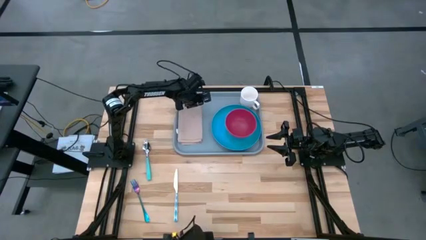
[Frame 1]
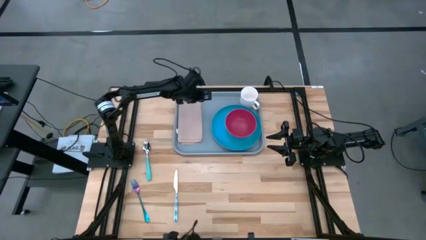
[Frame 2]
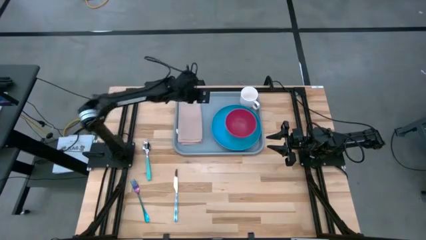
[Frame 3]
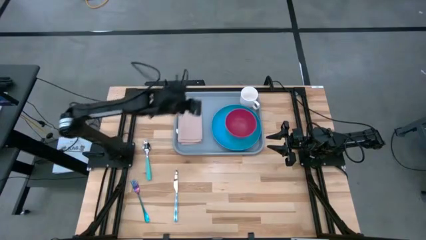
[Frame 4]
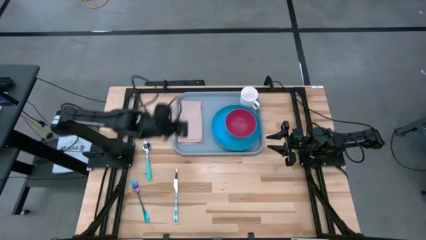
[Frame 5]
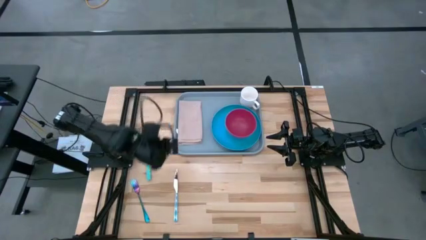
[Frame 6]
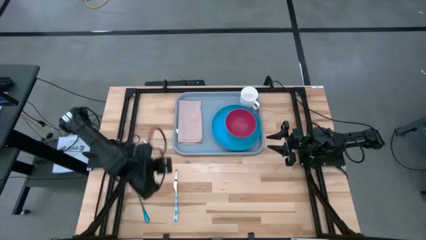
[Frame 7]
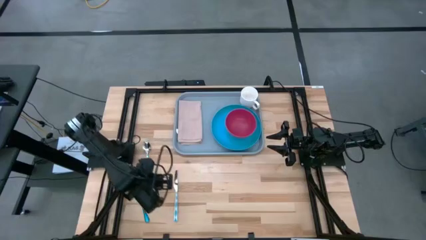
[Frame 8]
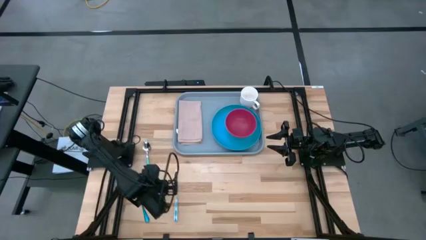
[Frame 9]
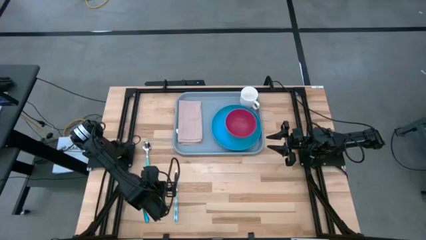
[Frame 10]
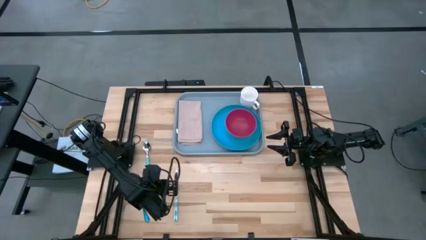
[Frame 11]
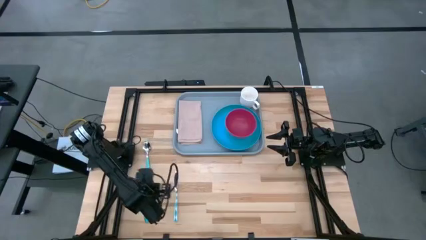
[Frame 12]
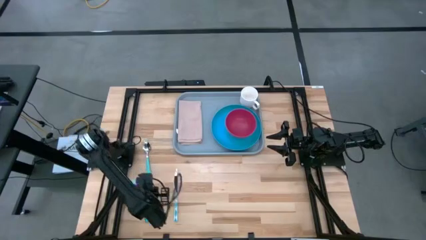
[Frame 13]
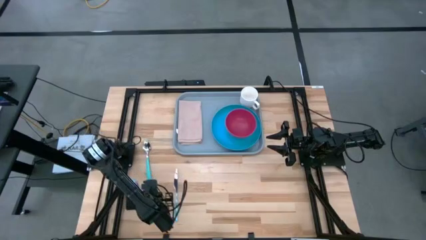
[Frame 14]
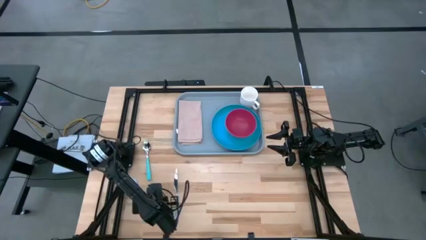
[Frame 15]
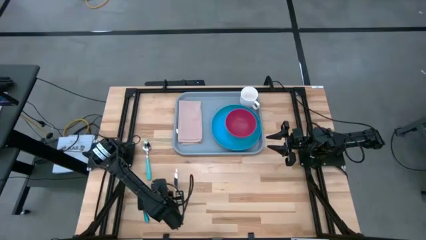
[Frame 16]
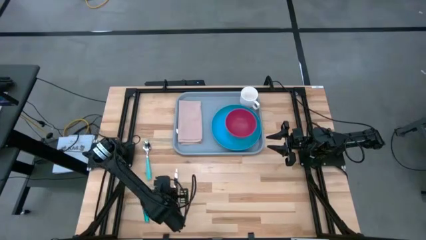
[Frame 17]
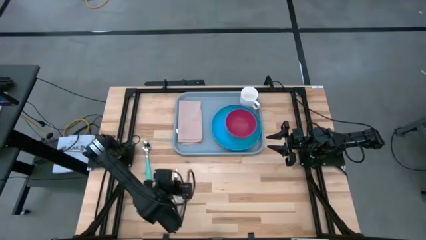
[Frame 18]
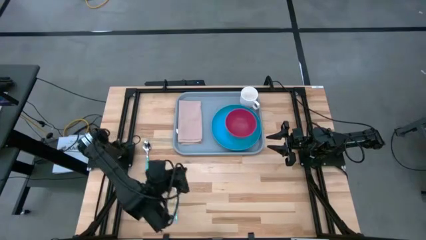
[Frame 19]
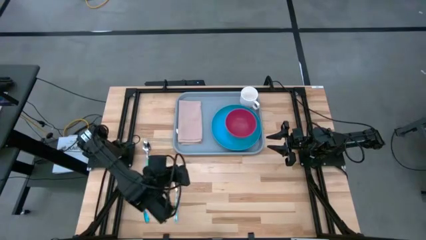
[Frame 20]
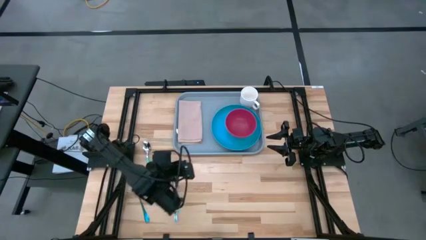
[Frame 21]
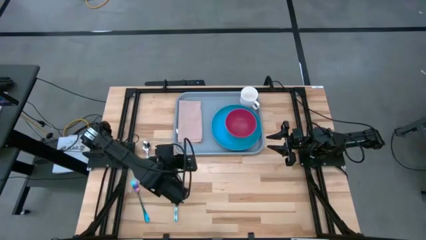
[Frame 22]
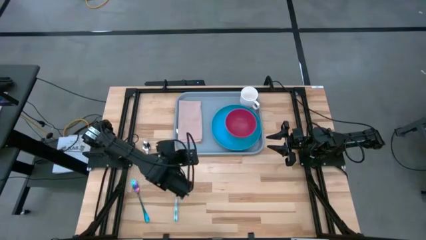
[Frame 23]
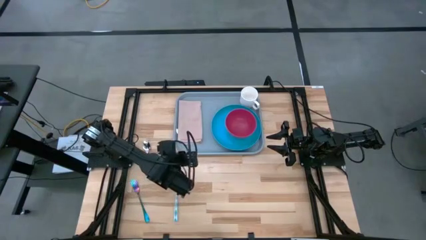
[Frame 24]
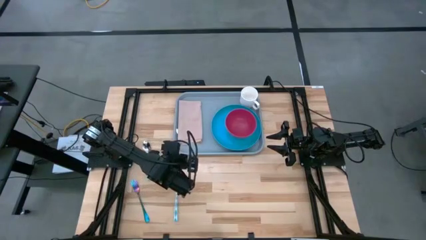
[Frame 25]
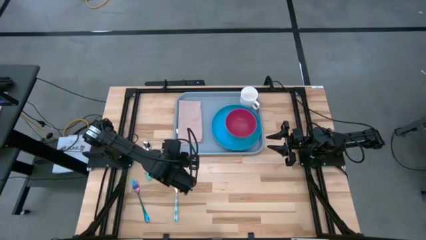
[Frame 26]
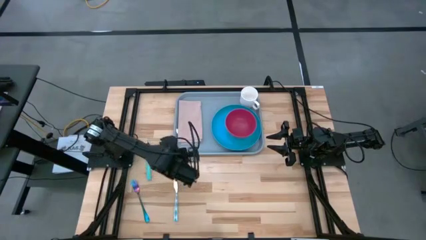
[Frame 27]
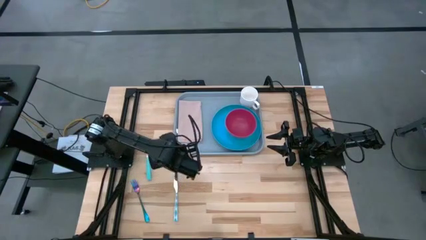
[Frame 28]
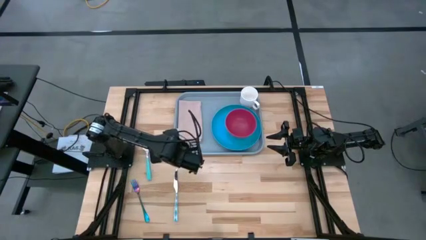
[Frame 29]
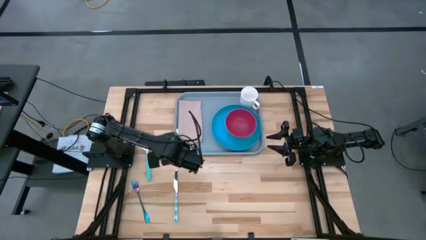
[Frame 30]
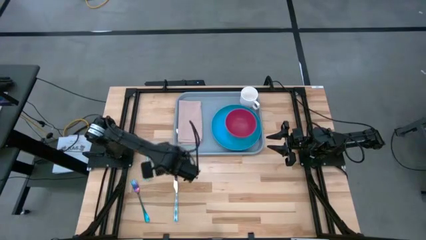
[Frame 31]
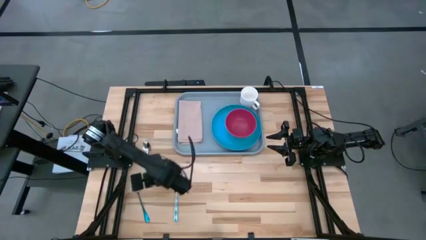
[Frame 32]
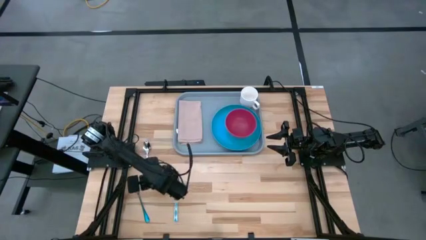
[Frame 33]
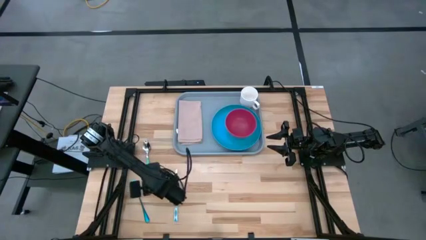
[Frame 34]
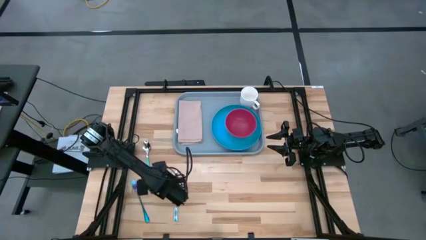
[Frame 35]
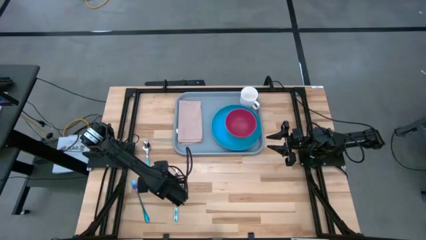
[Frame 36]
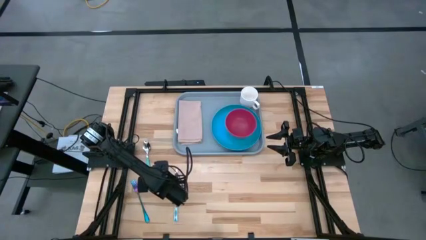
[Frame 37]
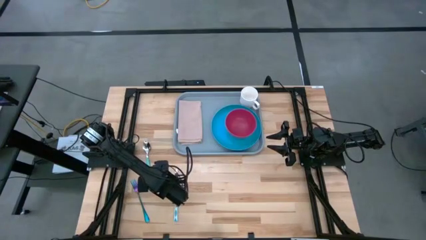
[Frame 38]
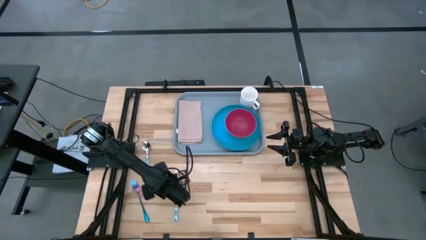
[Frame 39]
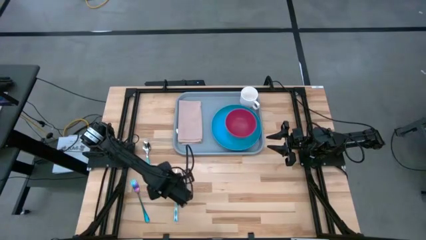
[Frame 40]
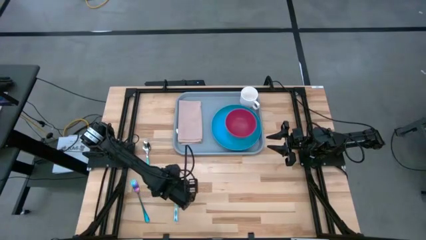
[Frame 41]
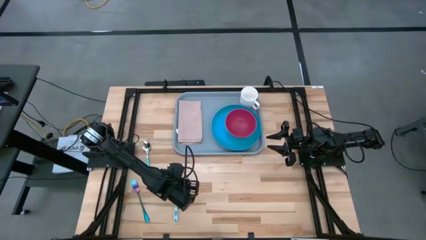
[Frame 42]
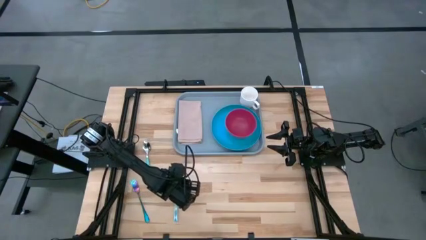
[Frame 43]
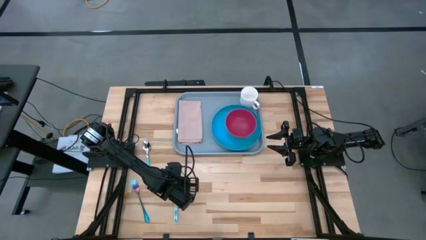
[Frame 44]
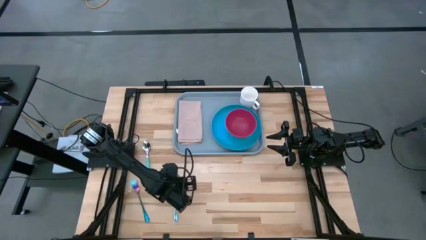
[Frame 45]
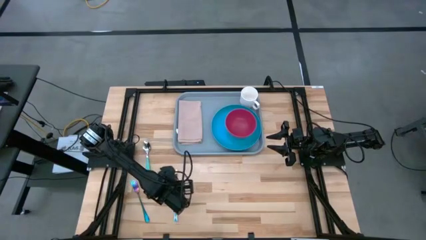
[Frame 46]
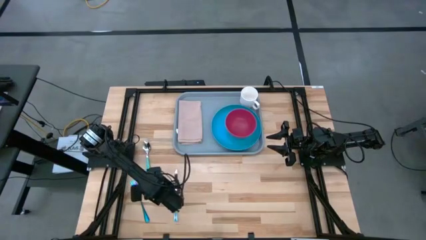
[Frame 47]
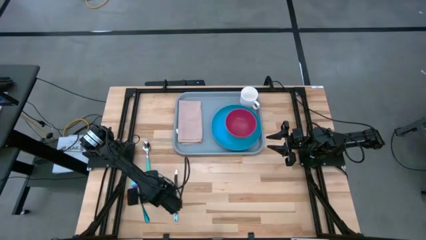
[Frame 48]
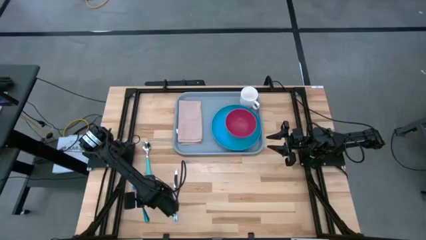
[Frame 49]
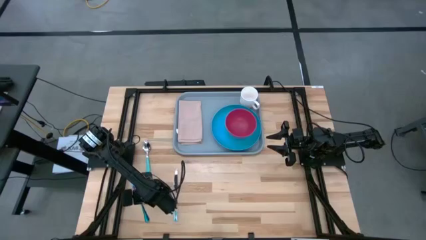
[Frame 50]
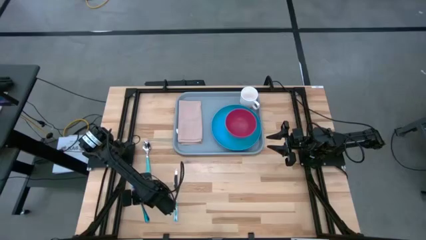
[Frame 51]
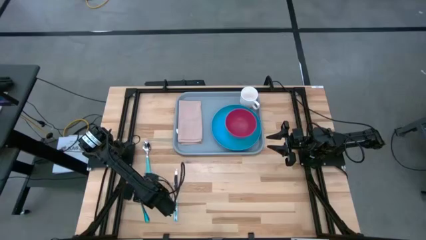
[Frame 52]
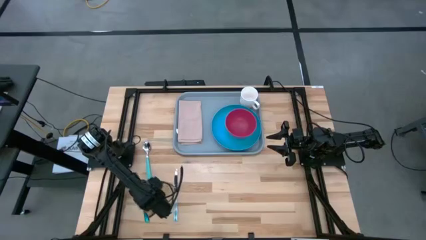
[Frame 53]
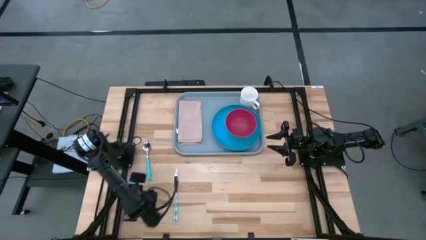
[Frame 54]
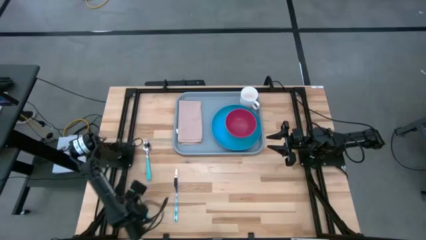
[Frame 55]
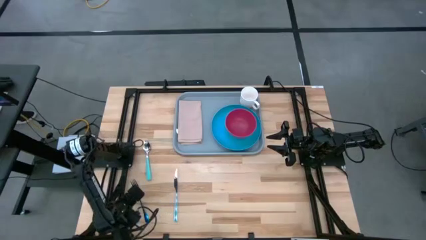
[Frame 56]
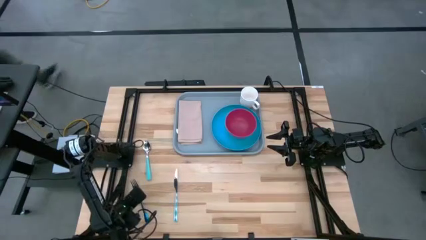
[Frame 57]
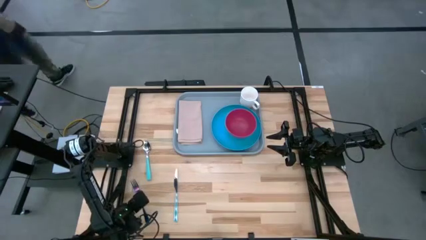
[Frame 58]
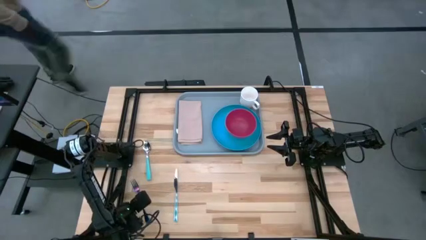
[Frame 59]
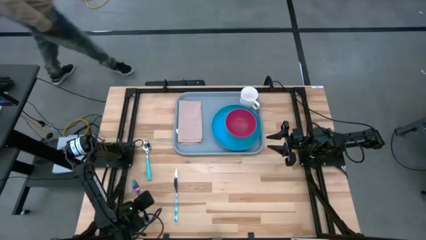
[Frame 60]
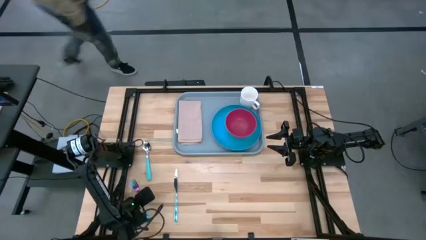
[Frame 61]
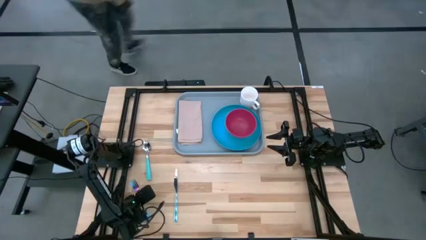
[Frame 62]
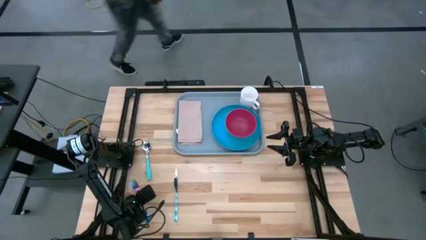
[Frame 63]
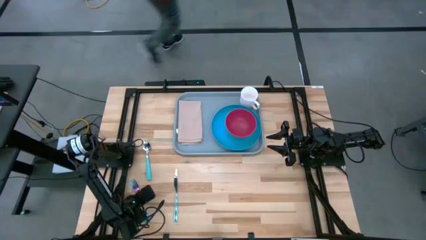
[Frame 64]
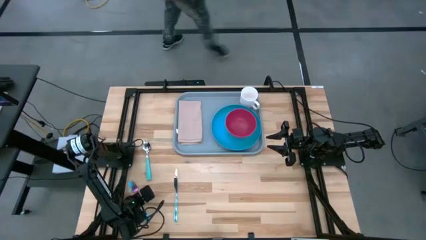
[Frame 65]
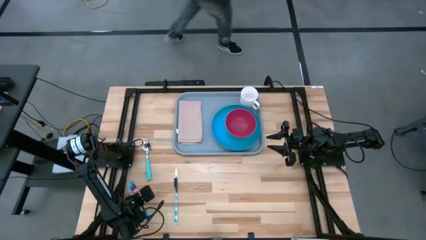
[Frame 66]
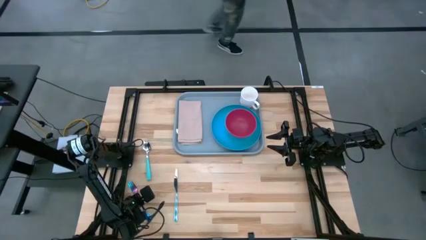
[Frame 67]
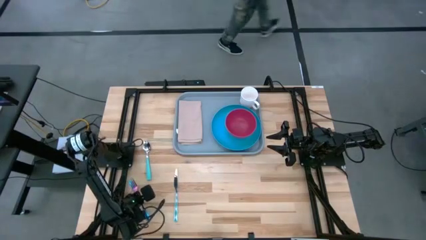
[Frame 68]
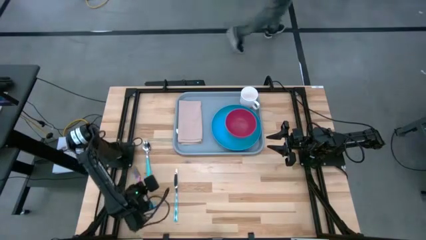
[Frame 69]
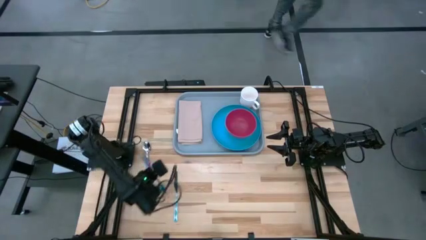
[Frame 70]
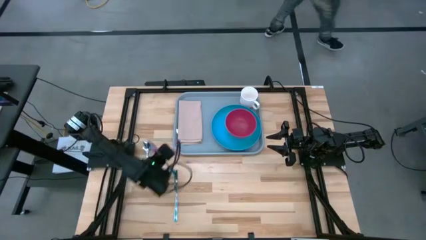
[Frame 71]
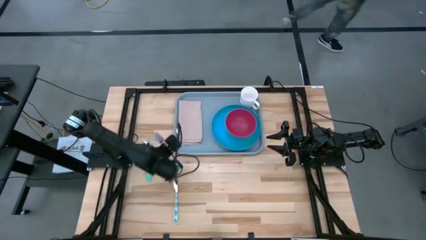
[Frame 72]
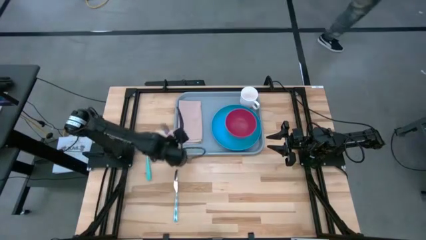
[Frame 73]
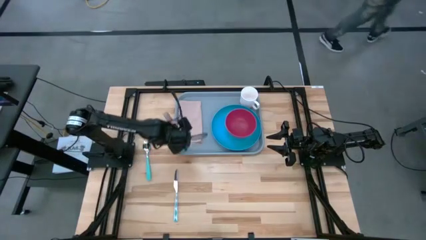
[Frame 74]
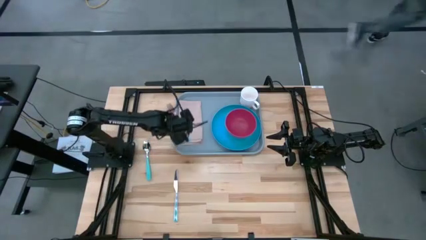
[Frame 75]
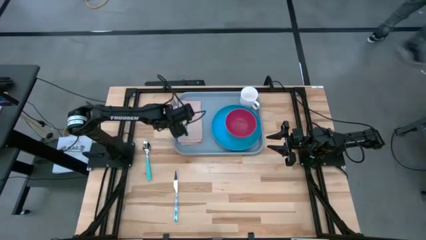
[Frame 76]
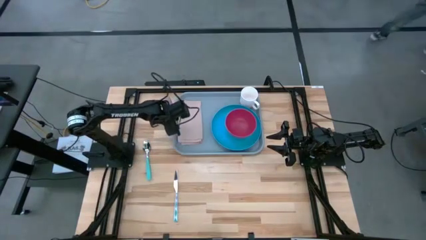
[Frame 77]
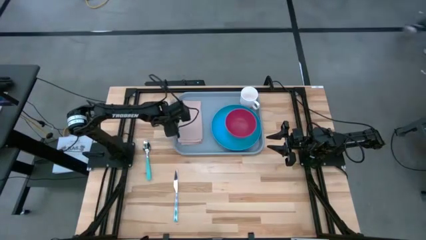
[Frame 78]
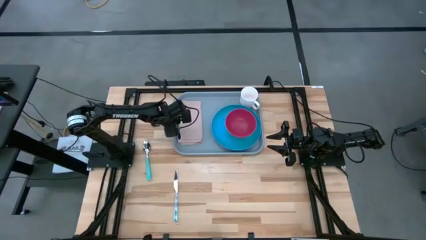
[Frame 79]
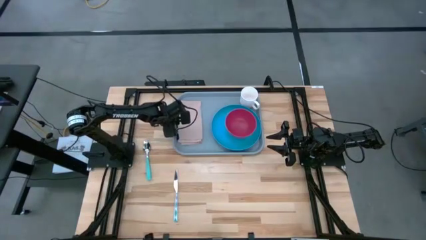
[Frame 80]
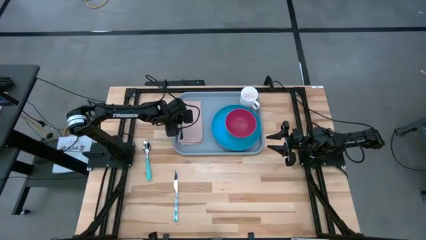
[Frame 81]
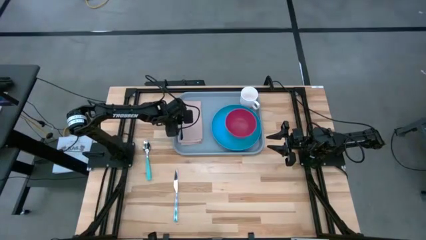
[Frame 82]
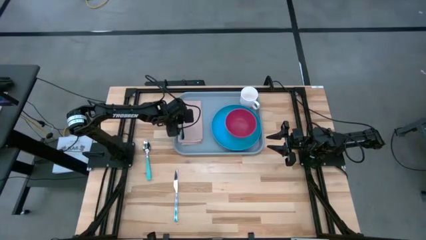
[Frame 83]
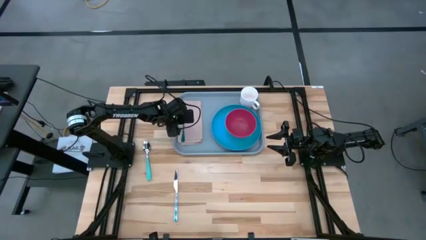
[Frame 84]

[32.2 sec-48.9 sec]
Task: Set up tray
Put the blue fork on the pink napkin on the gray serving tray
